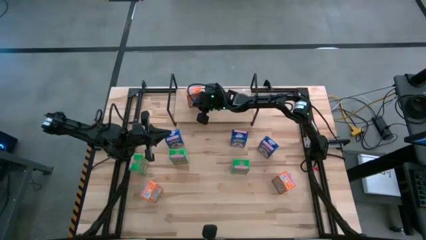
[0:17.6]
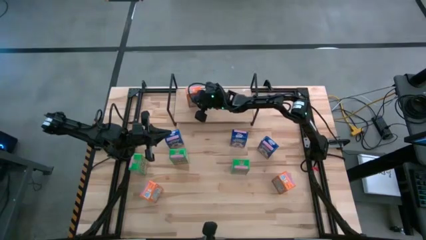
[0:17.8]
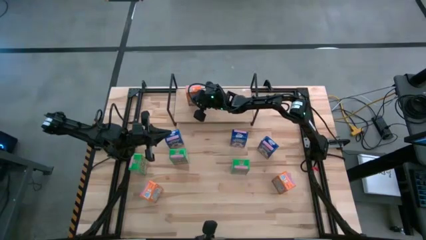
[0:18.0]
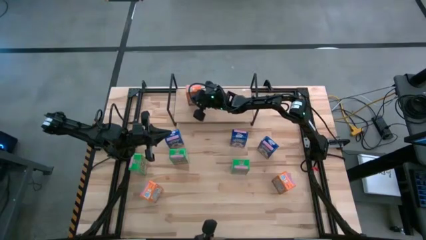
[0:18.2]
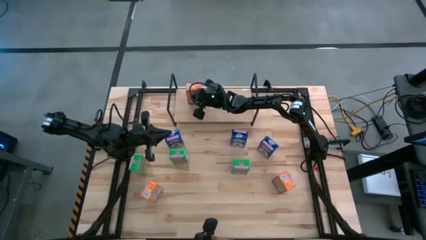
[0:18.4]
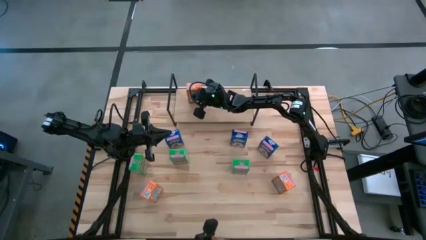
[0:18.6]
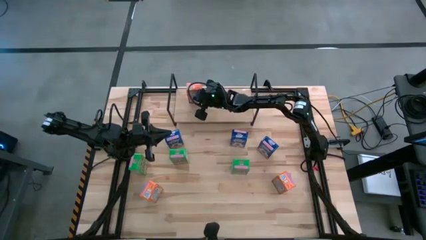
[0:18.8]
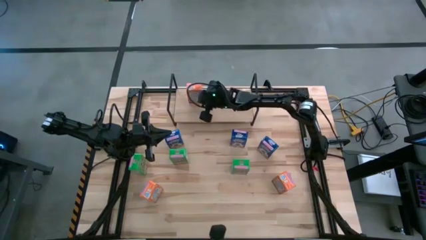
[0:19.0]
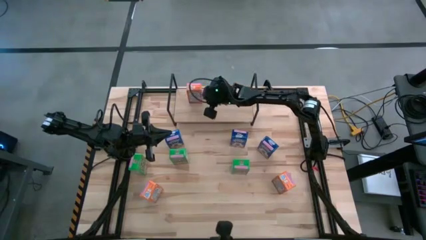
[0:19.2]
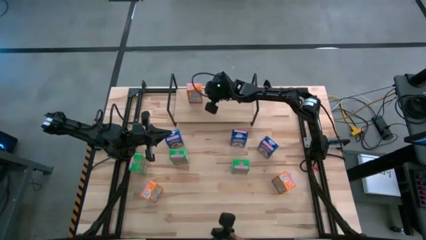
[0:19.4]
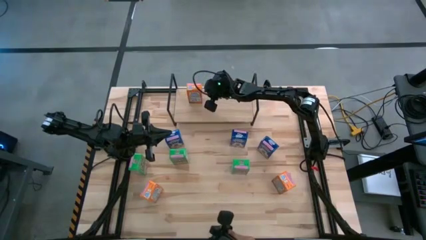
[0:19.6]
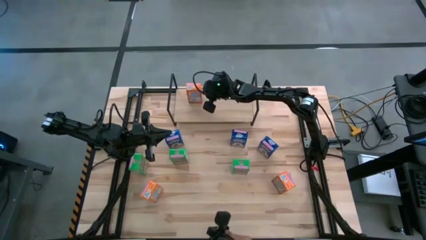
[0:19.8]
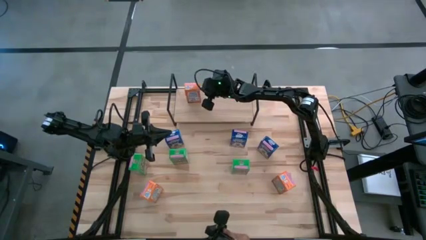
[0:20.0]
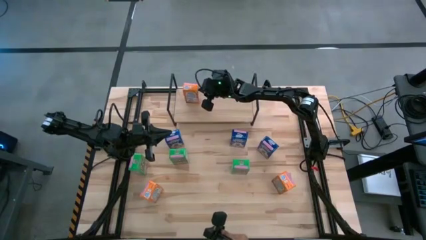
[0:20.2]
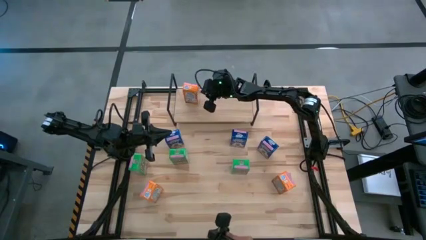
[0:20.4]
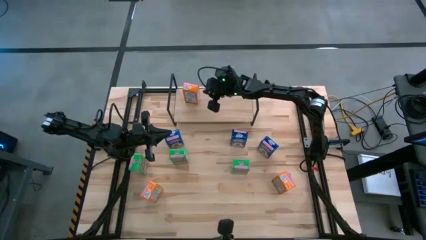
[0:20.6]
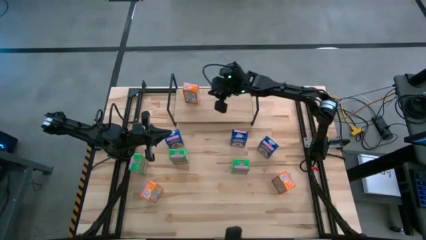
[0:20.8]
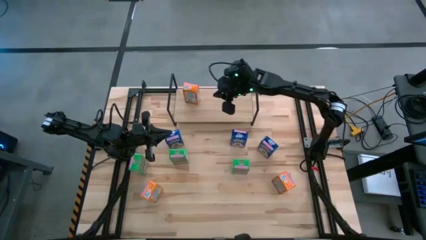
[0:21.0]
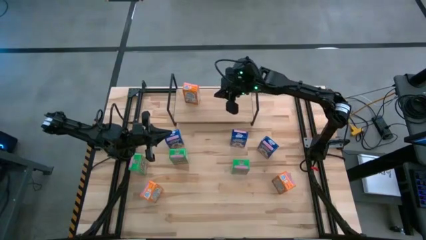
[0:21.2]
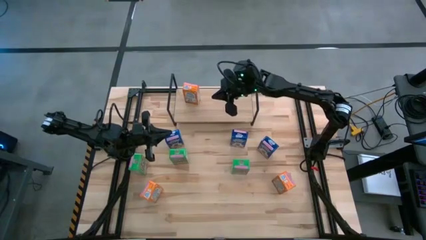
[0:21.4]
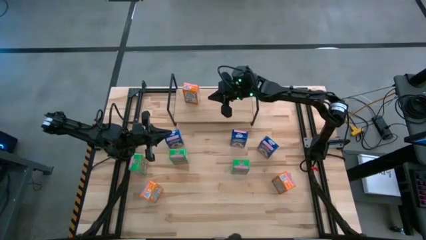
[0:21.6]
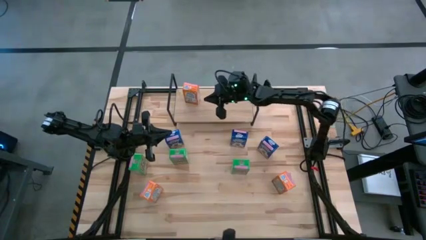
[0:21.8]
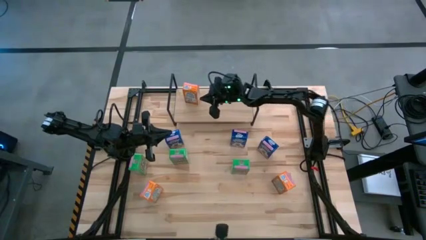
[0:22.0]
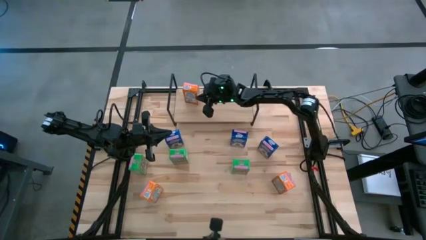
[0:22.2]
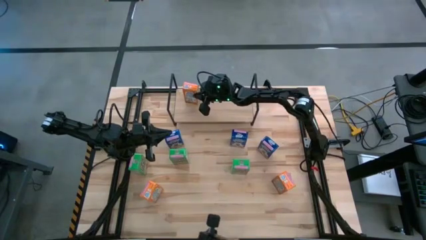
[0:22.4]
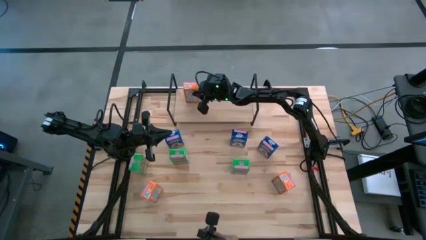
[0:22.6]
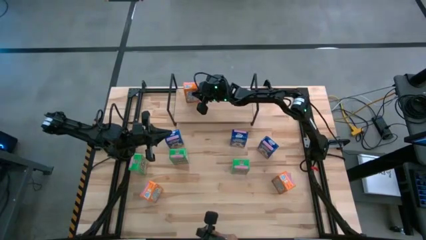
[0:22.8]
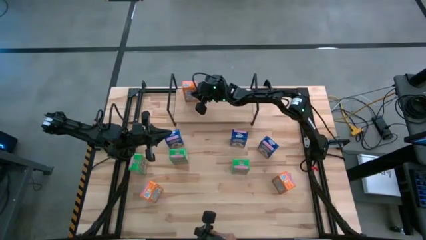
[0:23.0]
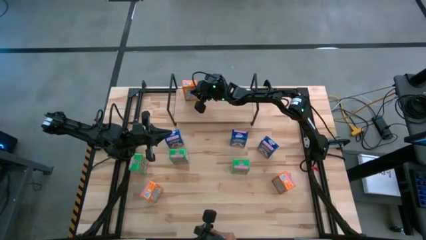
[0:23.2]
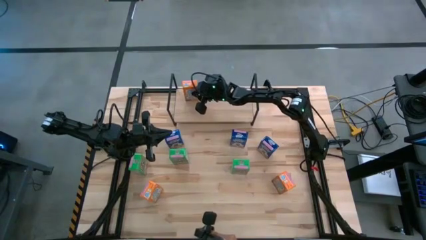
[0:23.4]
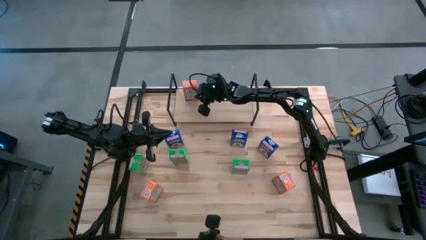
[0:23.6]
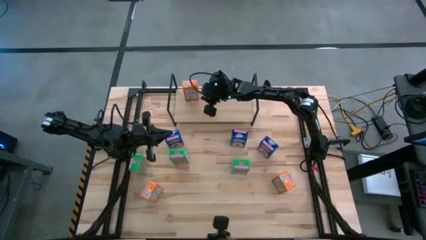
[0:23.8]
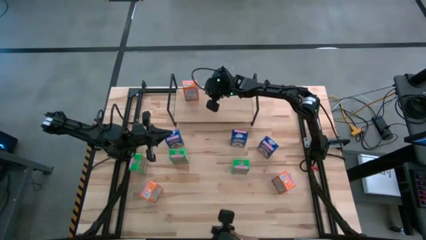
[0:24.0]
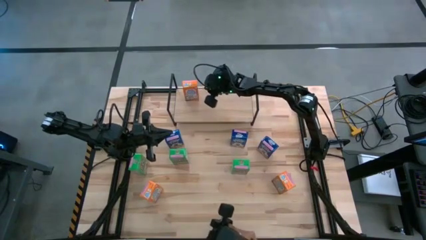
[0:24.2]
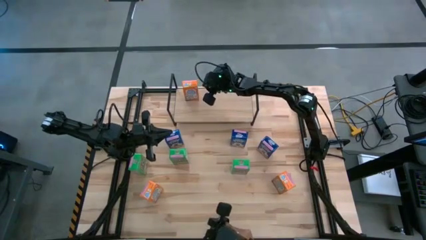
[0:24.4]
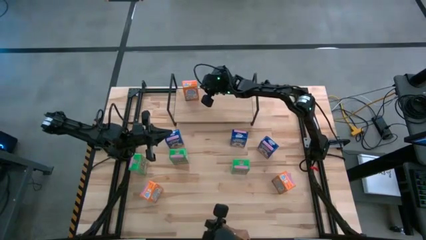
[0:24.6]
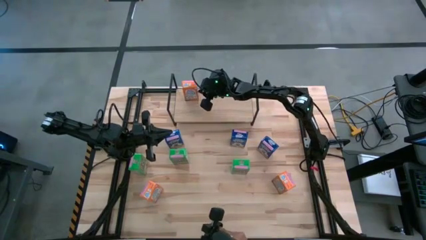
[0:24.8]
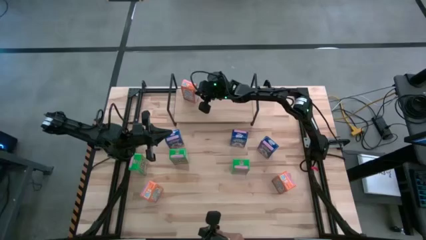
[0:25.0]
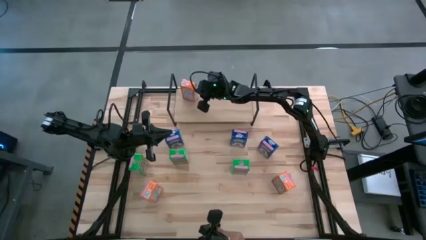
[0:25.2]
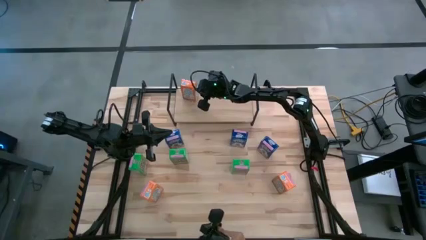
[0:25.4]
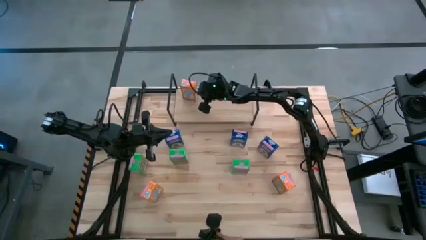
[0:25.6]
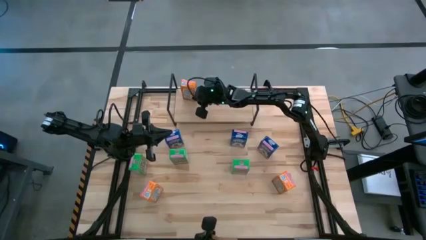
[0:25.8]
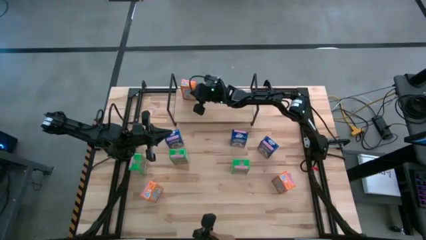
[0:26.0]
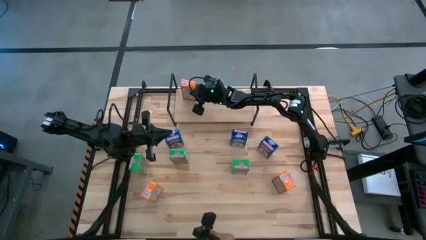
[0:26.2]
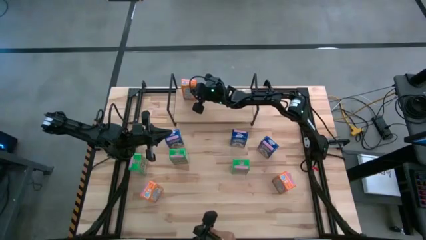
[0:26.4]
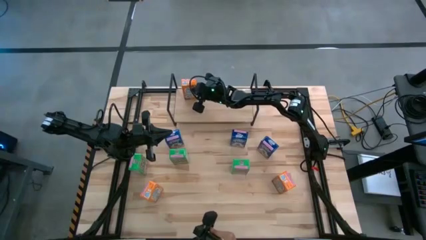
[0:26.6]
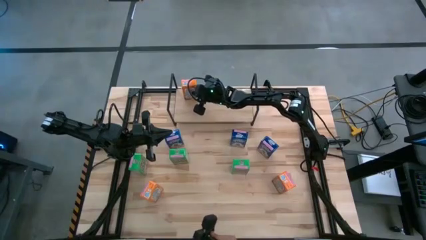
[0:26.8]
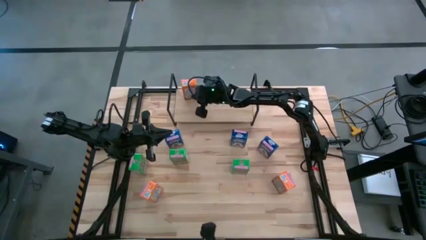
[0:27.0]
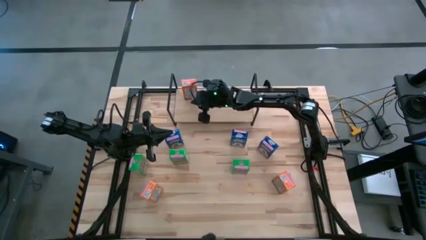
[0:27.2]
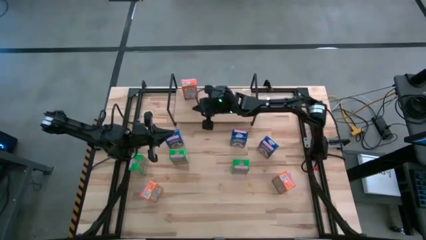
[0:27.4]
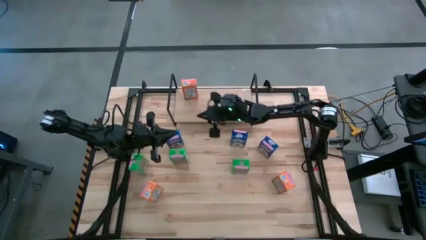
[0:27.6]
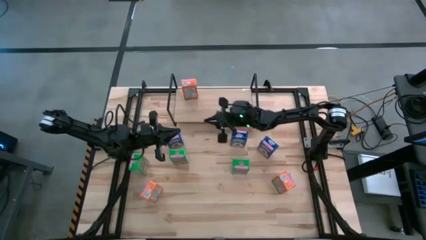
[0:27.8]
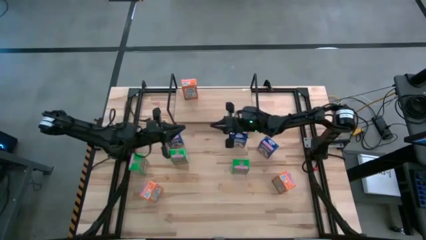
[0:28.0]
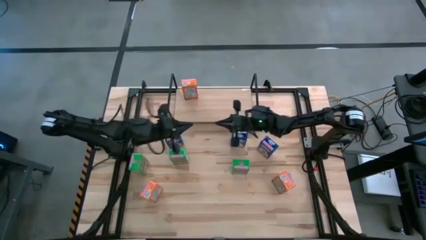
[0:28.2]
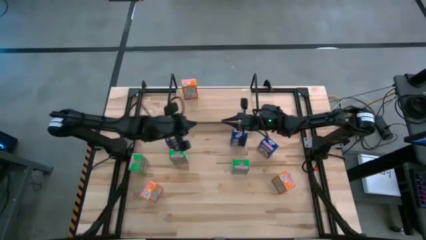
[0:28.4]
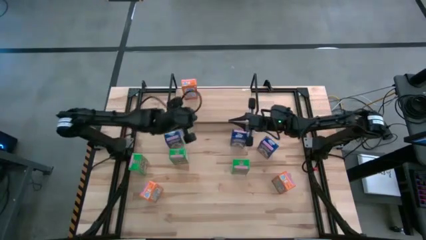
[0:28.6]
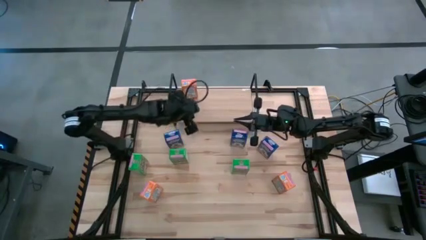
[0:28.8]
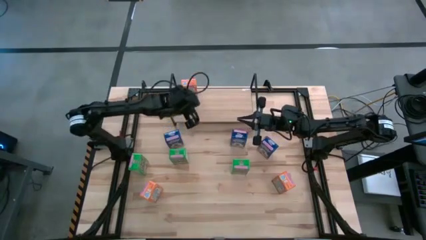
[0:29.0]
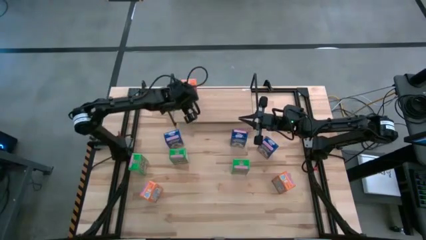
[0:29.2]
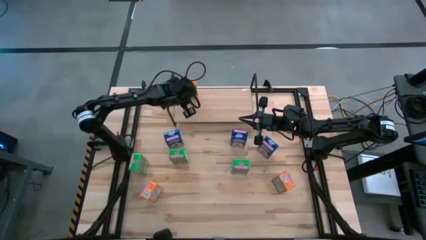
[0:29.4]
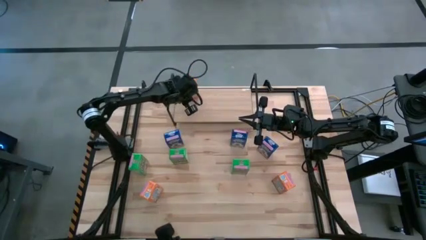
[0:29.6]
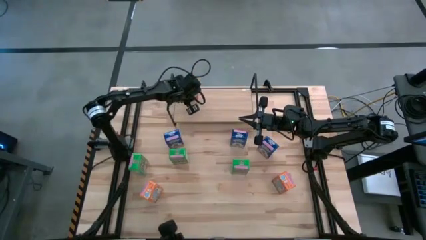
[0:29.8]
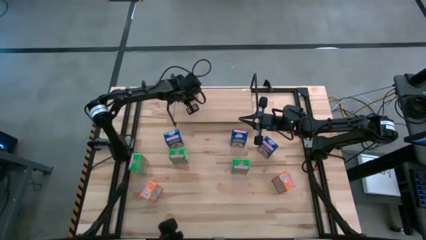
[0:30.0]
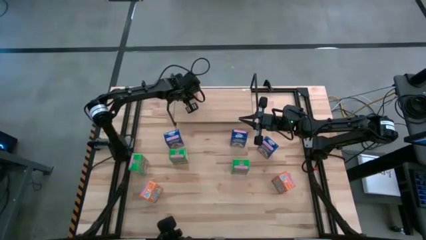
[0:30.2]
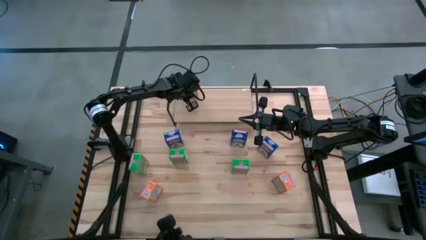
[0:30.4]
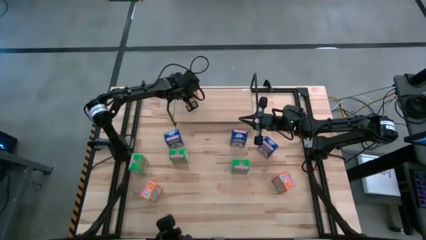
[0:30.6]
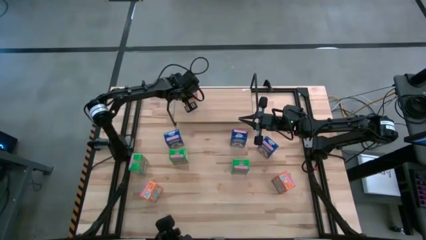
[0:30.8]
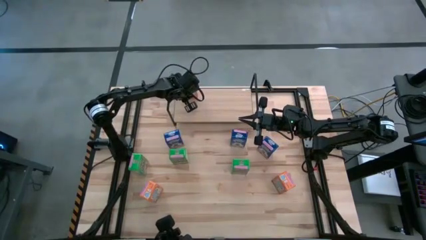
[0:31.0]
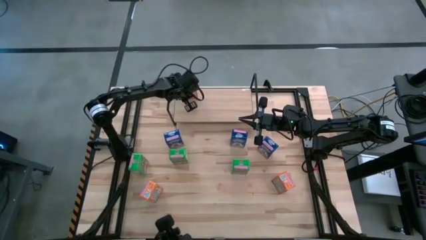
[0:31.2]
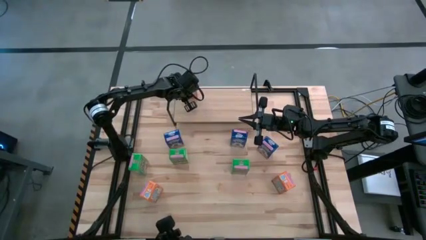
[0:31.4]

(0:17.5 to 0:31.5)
Task: Stack cereal on shelf
Put the center orange cereal box on the shelf

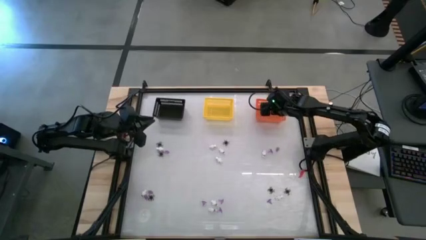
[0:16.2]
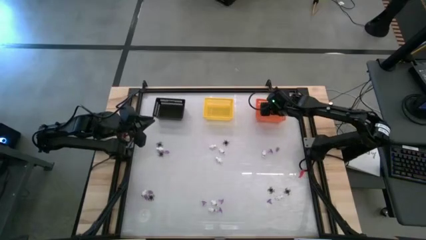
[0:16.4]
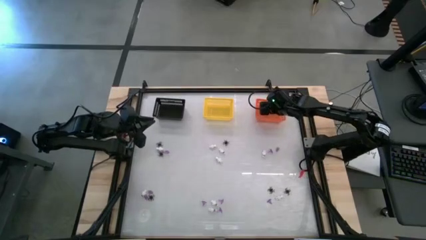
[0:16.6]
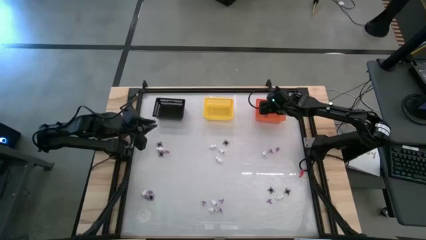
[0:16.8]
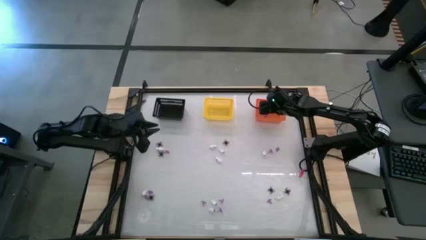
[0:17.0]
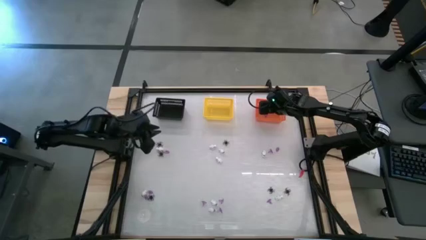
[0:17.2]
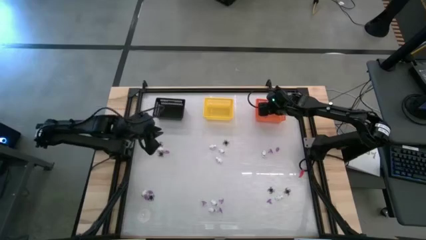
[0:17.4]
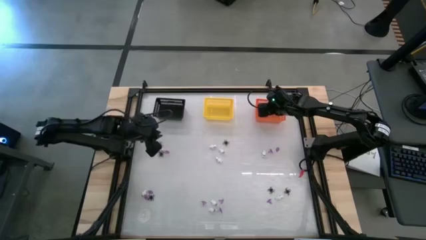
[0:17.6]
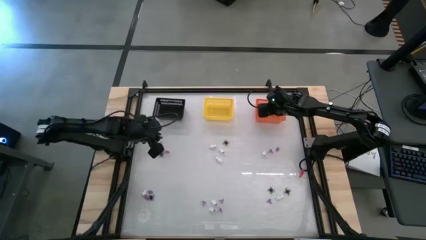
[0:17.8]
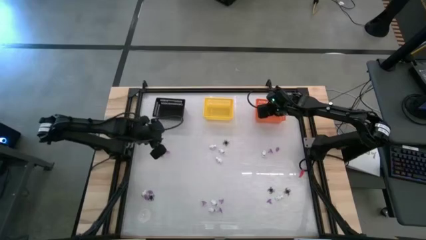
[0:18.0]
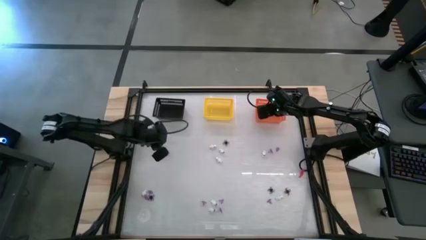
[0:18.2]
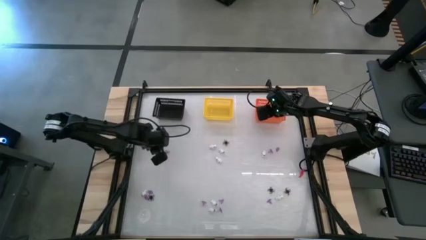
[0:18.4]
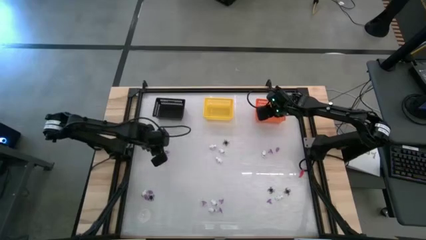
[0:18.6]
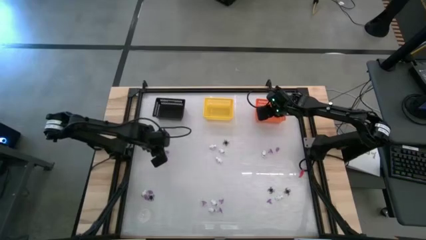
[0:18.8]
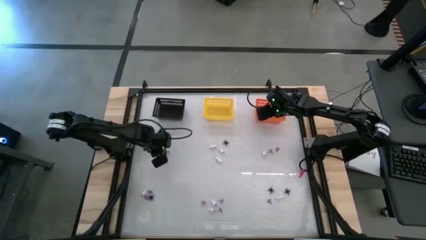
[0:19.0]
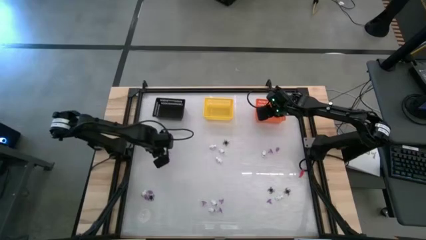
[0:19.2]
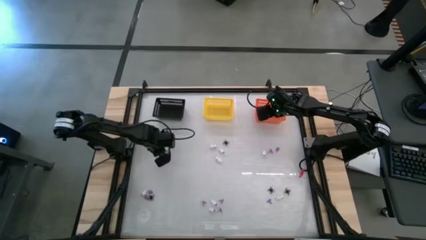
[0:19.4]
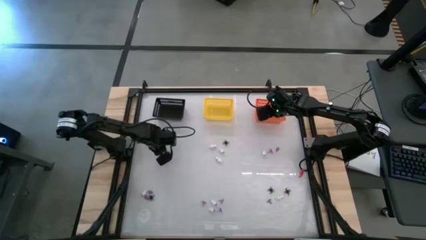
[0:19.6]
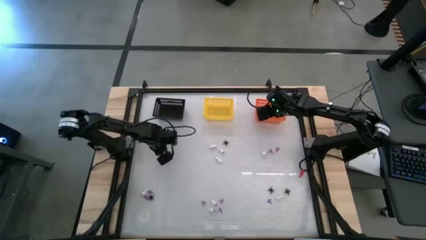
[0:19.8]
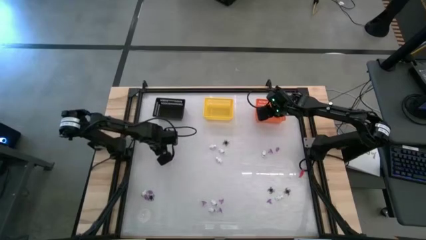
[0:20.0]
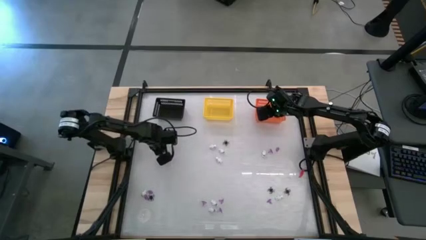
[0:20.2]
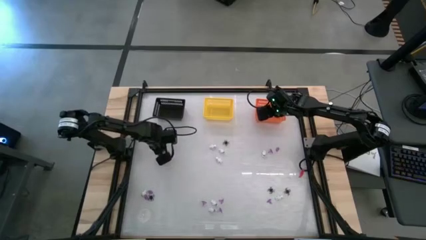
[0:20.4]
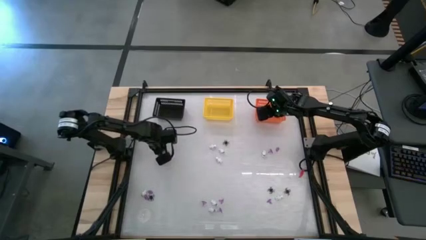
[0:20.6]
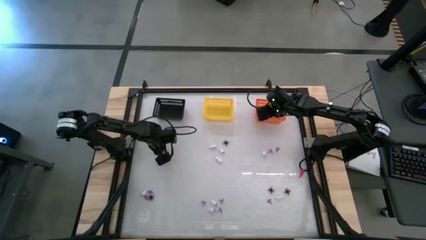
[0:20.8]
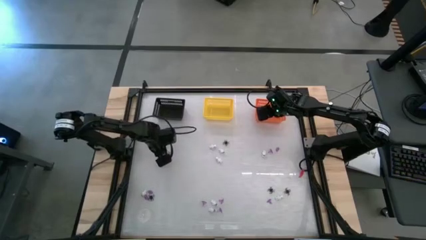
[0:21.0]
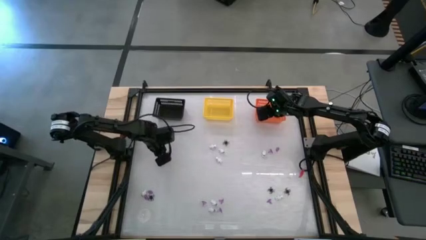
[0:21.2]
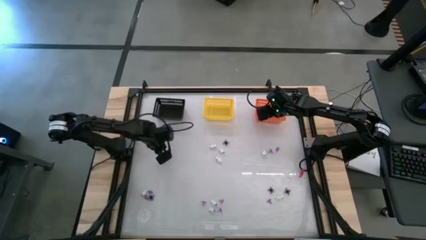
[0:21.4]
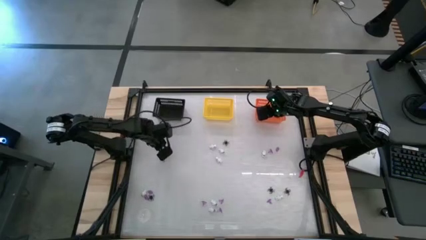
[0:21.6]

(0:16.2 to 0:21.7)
Task: Sort Halloween decoration
Put the white skeleton toy into the black basket
